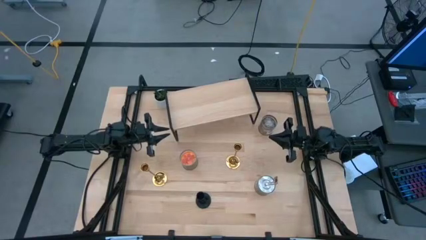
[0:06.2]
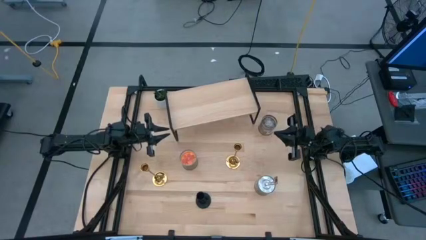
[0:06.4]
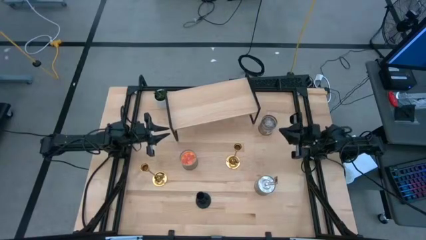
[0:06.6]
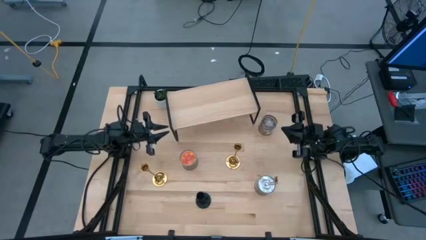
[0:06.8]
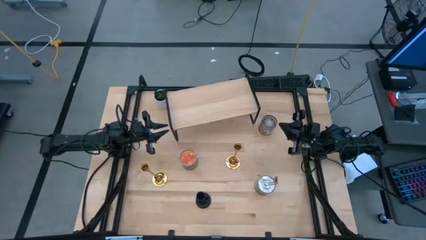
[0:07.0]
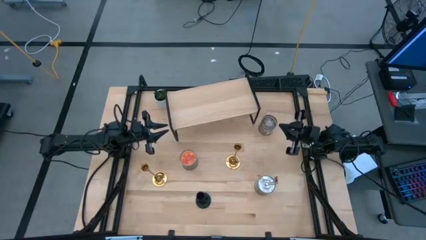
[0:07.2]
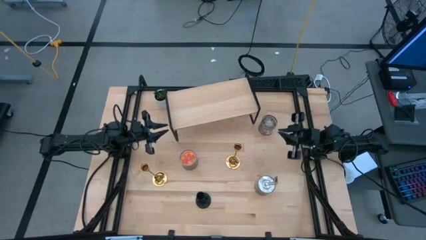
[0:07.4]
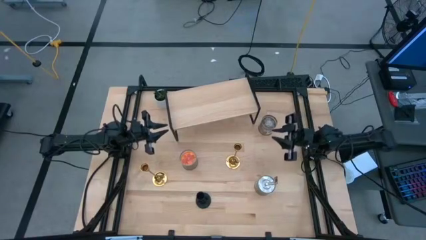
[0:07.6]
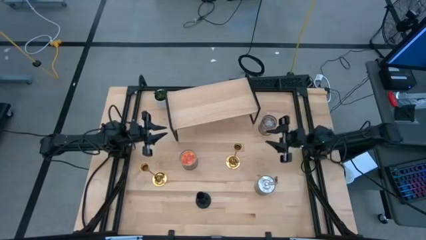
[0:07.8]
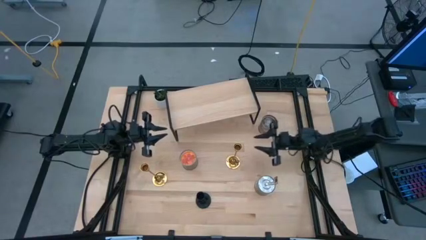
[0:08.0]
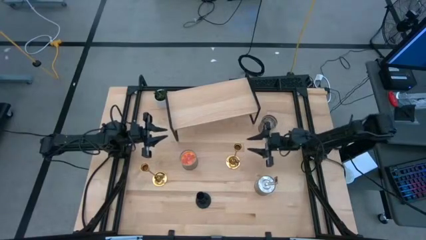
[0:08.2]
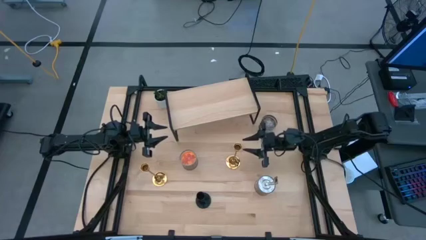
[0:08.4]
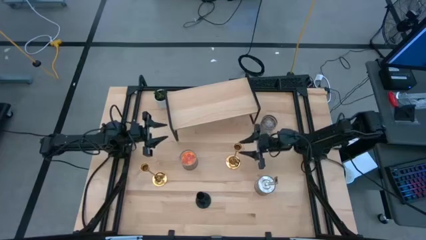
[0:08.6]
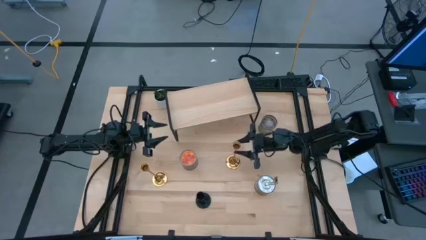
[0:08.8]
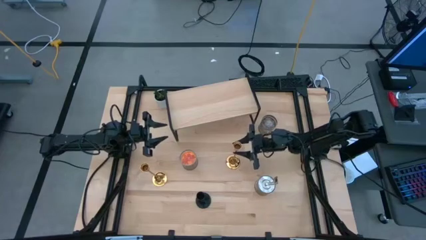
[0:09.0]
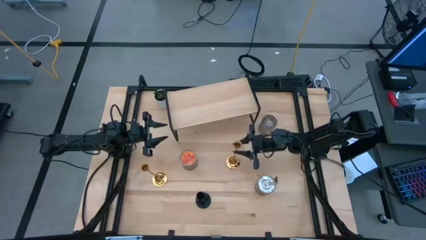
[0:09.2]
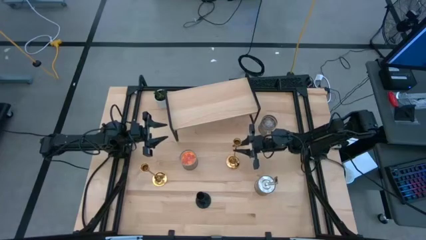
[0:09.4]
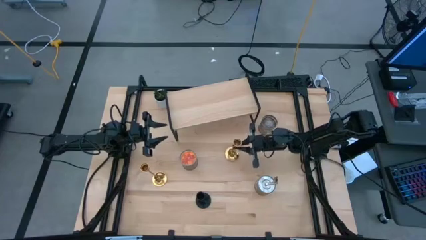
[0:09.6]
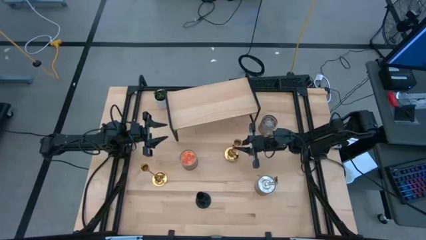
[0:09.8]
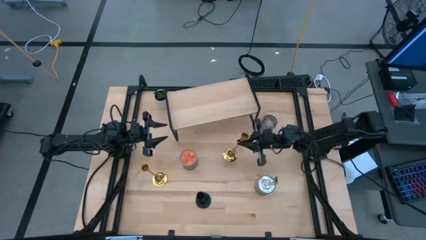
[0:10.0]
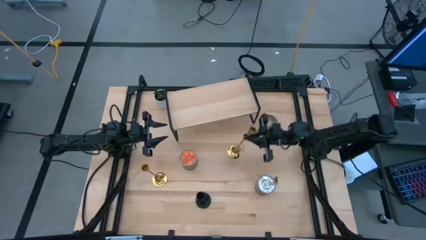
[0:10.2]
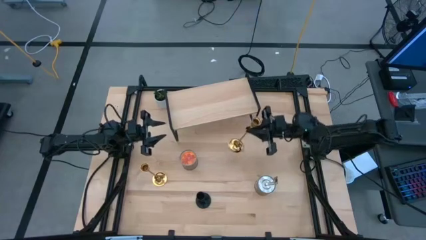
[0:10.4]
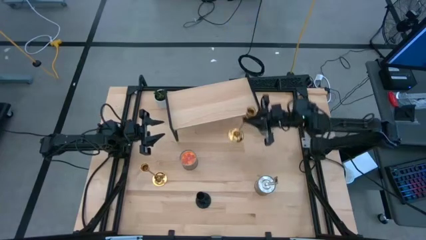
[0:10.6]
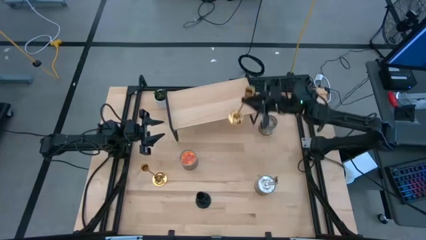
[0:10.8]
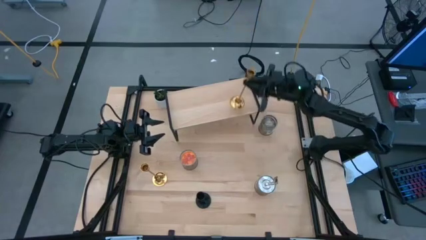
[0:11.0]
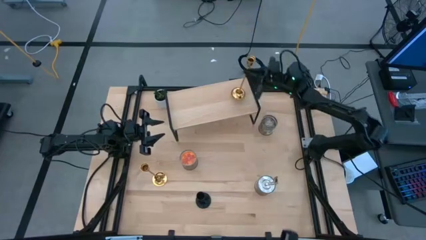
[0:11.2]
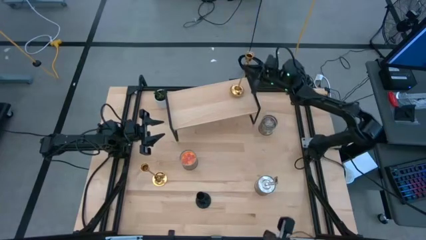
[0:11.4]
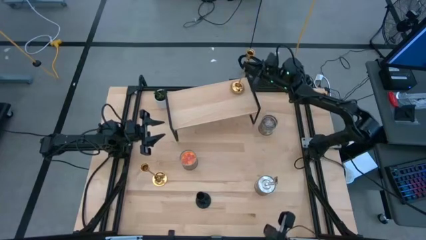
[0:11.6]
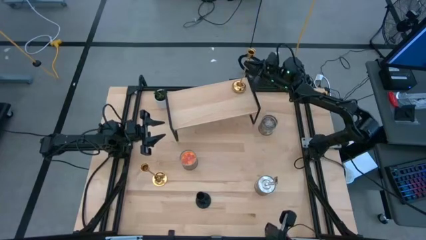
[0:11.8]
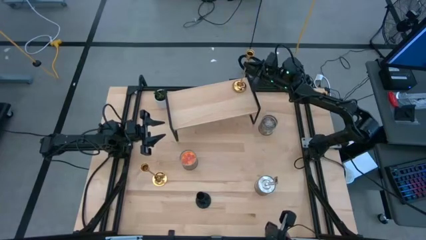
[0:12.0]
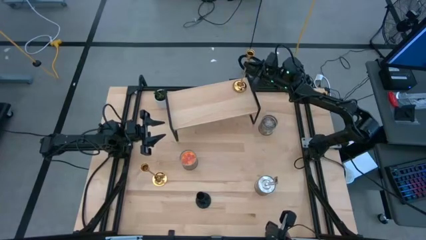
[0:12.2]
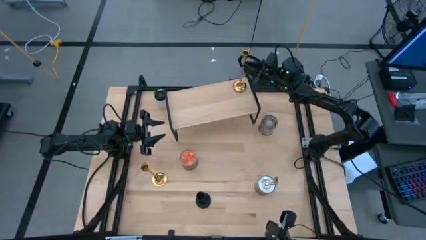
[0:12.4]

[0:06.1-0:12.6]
Task: Pick & Place candle stick holders
Put the right gold candle holder on the shelf

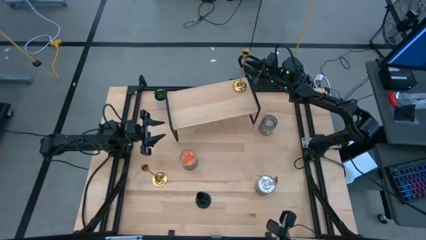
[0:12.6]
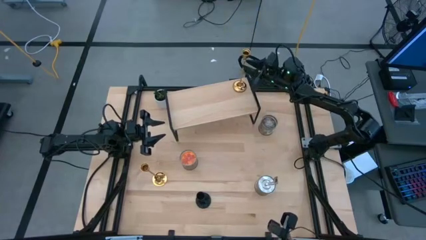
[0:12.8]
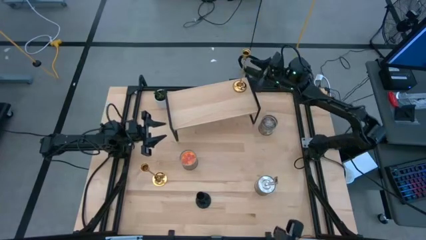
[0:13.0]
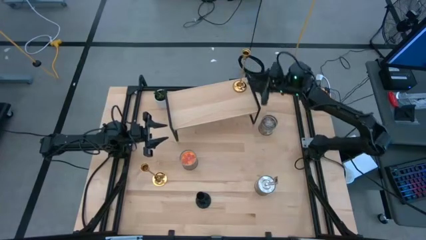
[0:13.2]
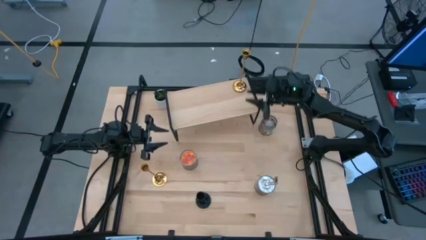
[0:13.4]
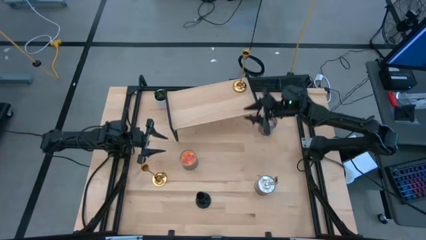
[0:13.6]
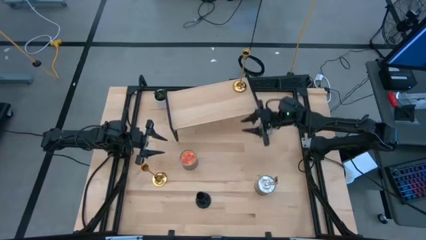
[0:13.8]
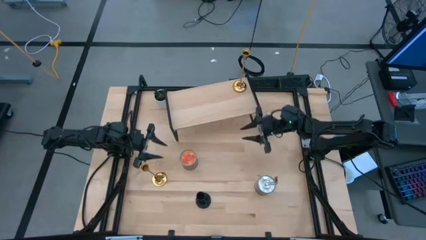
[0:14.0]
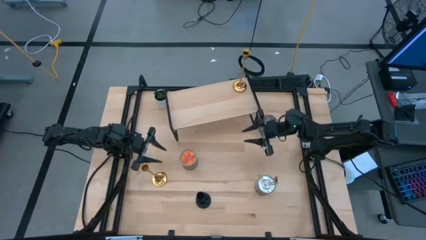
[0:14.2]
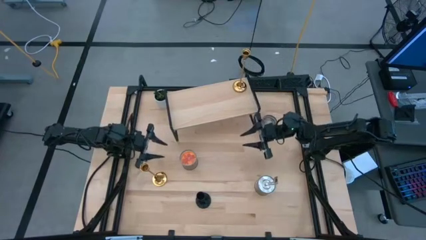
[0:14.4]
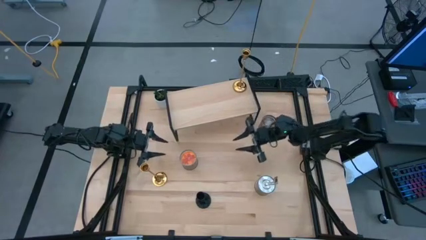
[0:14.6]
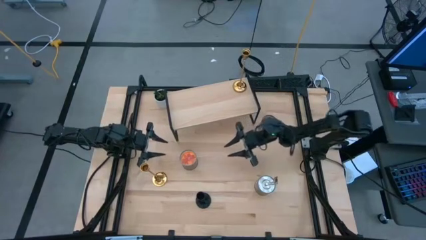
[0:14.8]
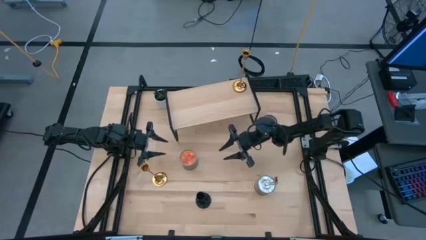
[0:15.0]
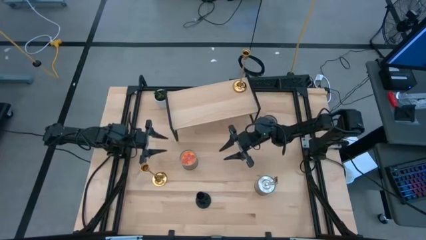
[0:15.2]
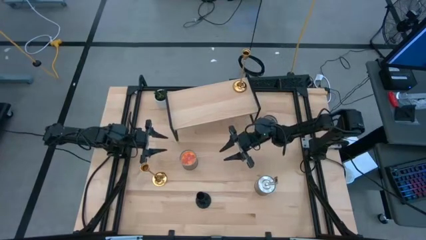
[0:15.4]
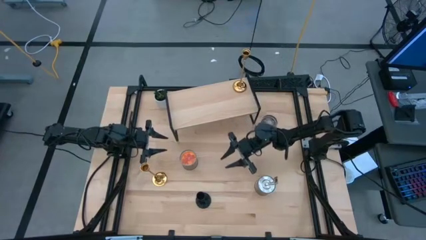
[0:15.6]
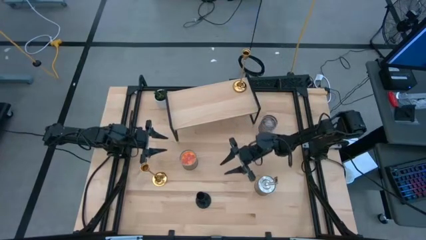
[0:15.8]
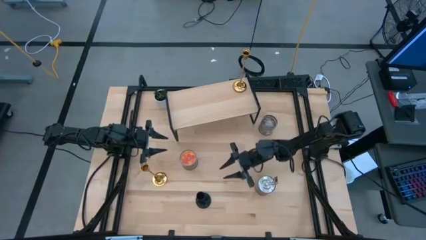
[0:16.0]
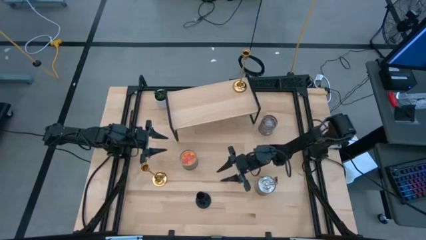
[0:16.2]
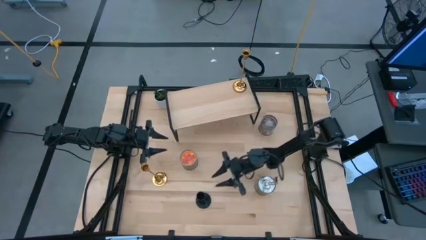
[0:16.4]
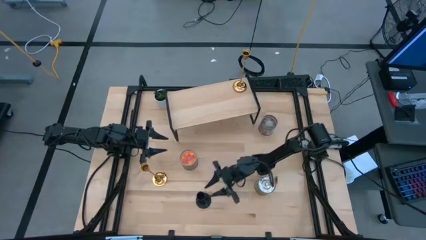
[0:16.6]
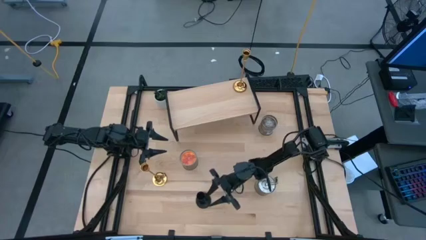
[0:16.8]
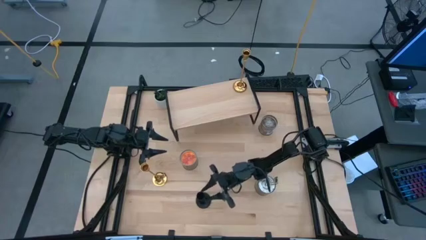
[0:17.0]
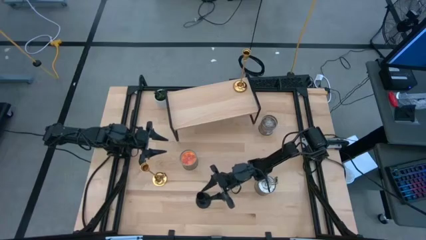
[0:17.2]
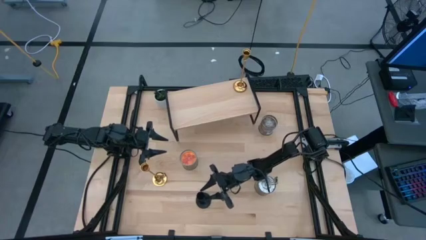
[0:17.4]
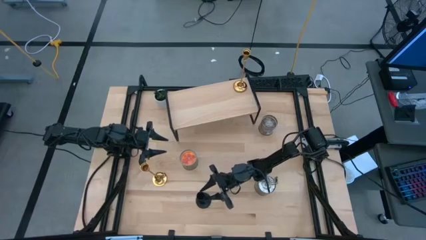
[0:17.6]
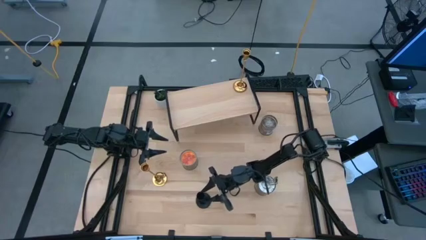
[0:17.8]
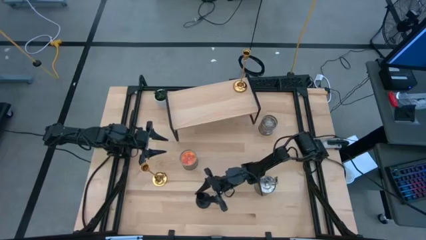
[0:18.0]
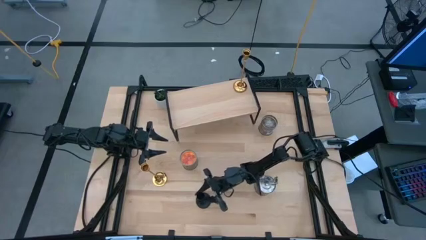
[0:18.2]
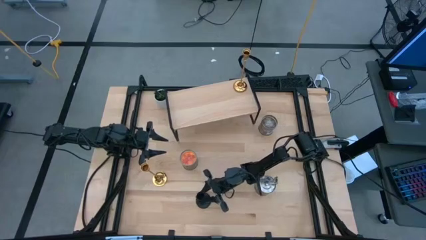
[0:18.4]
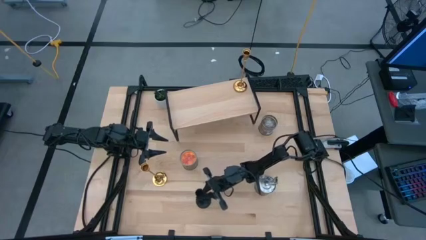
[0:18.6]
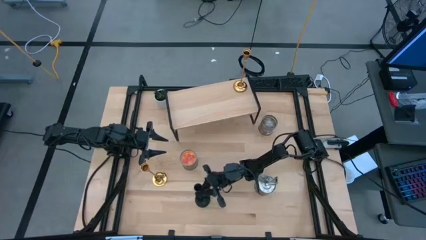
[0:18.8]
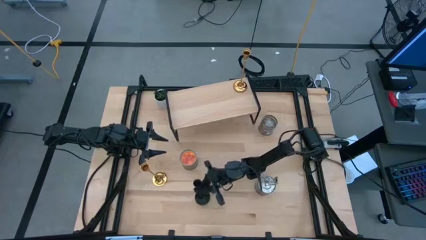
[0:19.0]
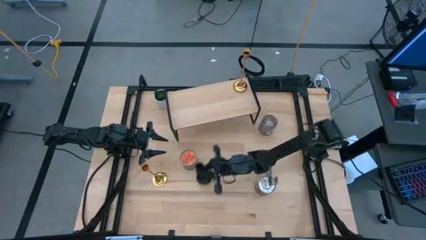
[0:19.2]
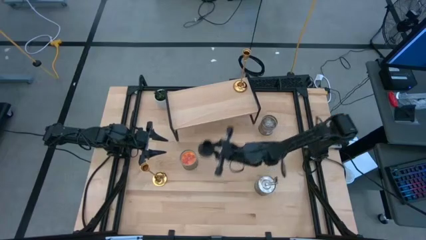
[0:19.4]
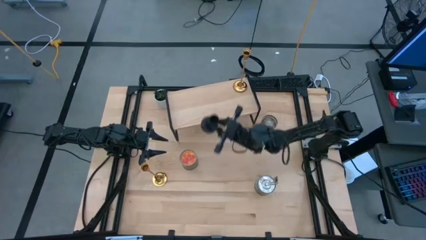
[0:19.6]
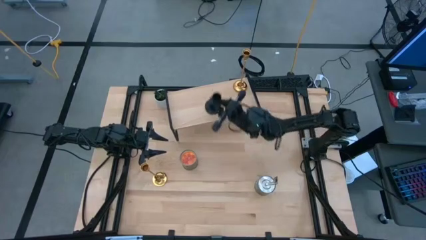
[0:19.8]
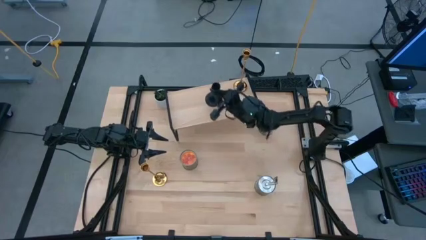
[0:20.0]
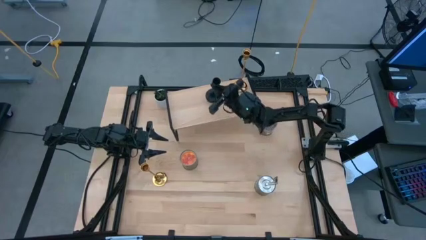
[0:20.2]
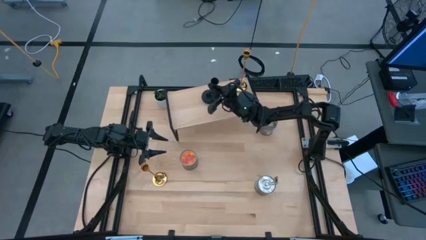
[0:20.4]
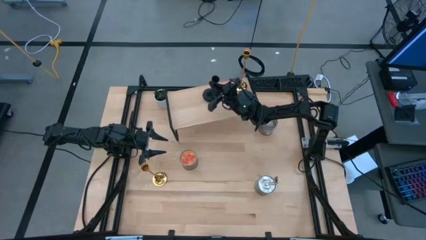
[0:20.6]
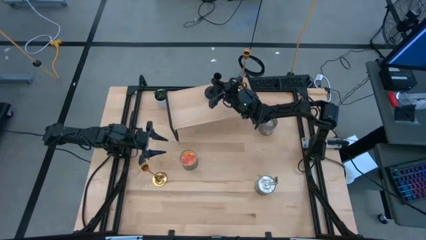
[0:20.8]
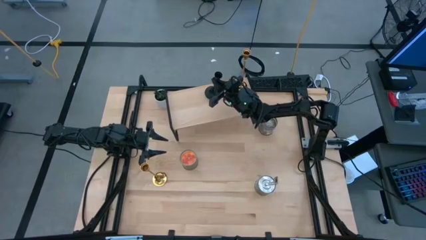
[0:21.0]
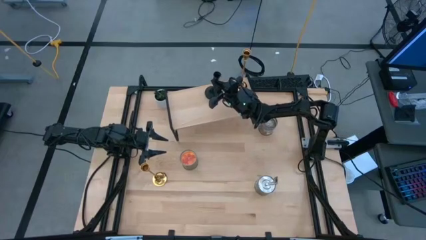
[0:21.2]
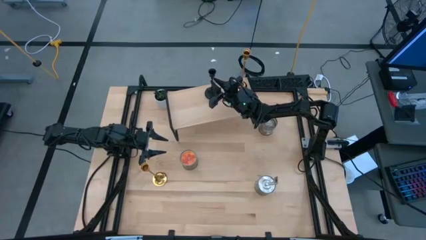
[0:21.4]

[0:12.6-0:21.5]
Put the black candle holder on the shelf
